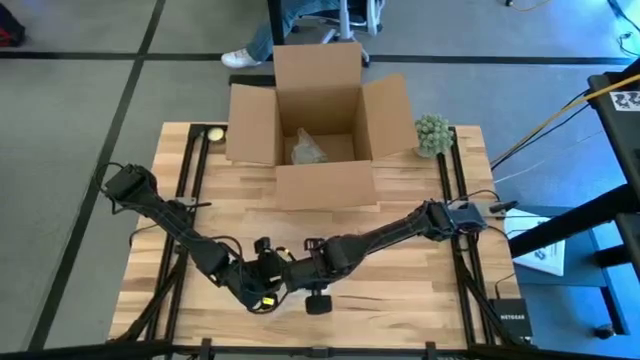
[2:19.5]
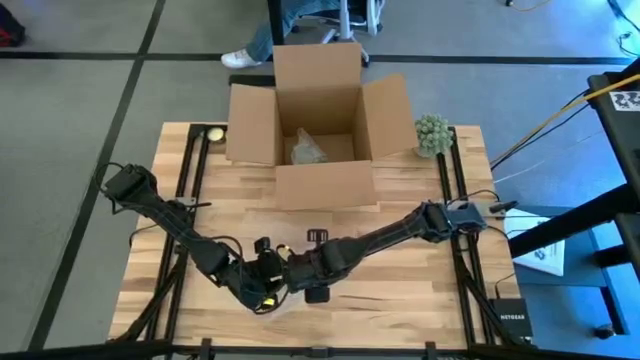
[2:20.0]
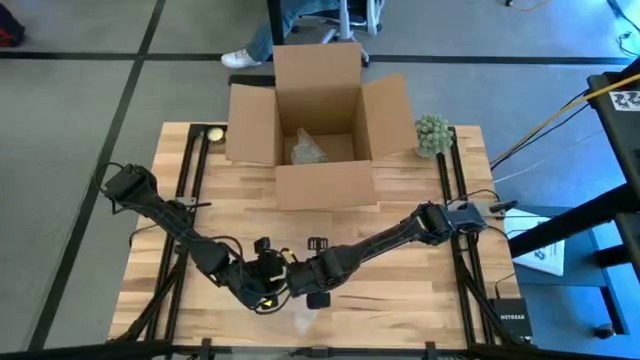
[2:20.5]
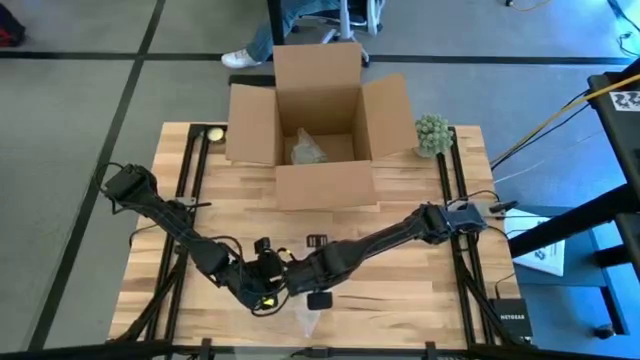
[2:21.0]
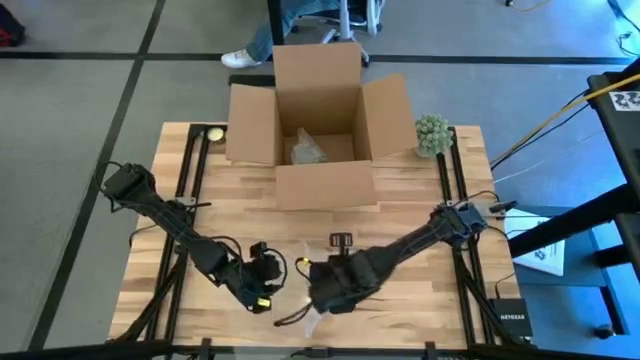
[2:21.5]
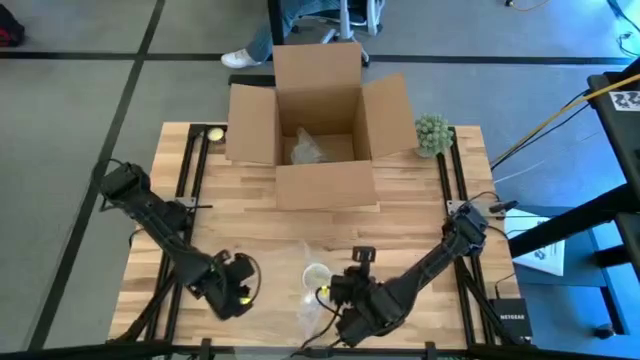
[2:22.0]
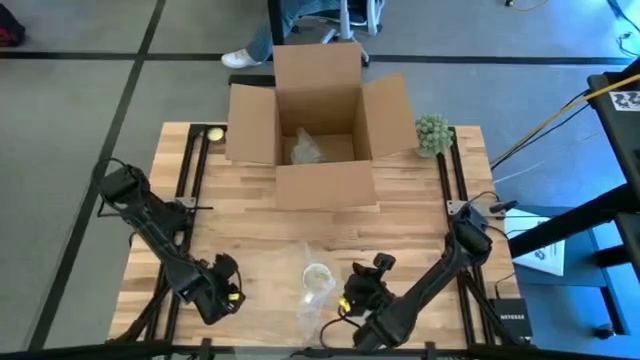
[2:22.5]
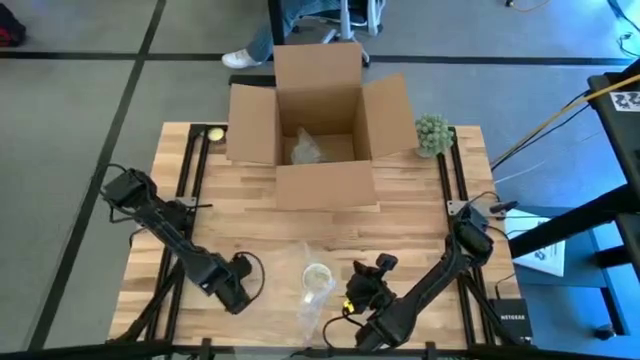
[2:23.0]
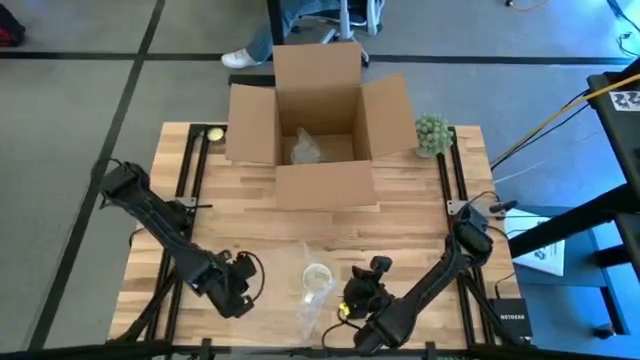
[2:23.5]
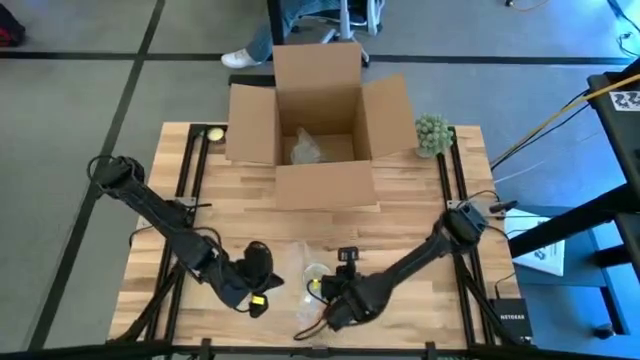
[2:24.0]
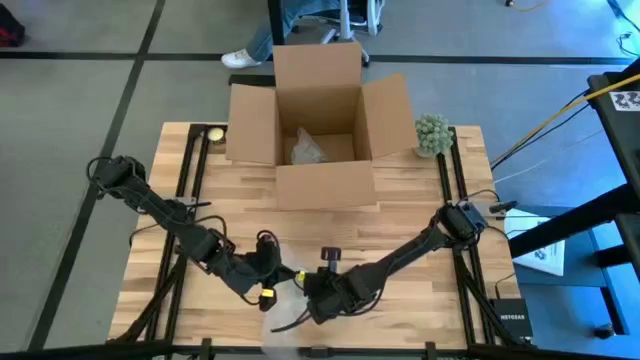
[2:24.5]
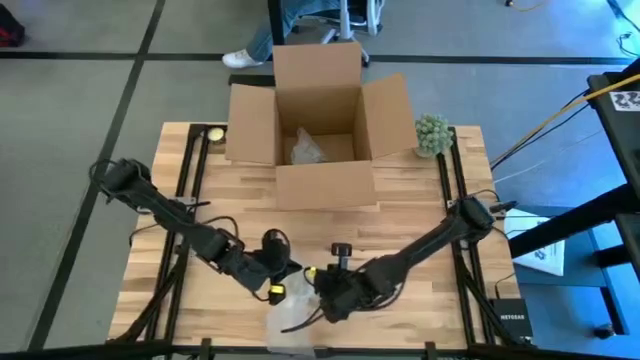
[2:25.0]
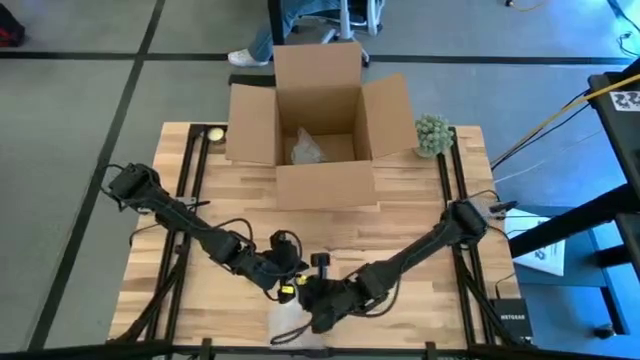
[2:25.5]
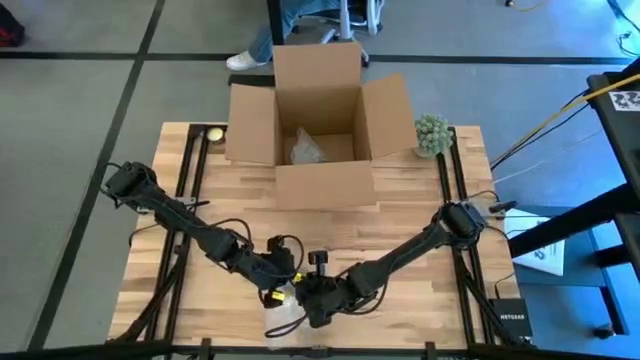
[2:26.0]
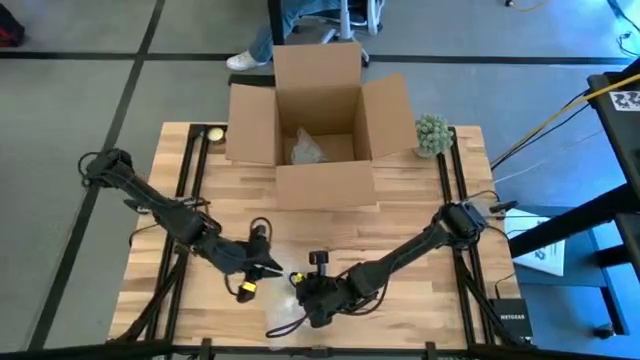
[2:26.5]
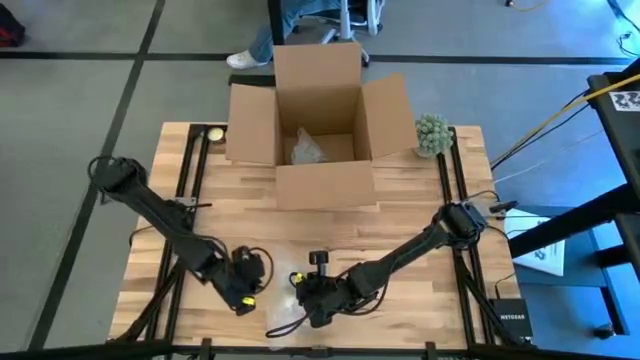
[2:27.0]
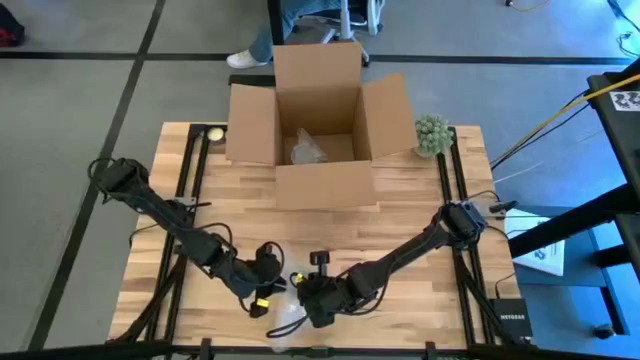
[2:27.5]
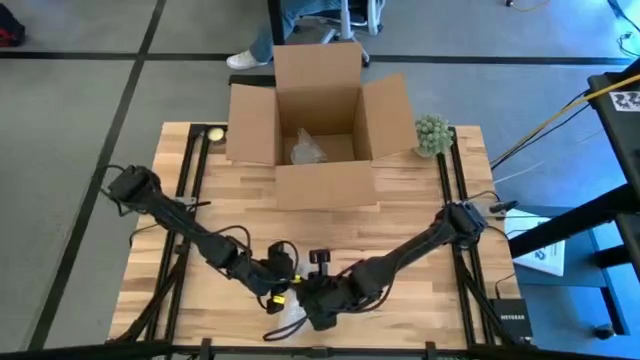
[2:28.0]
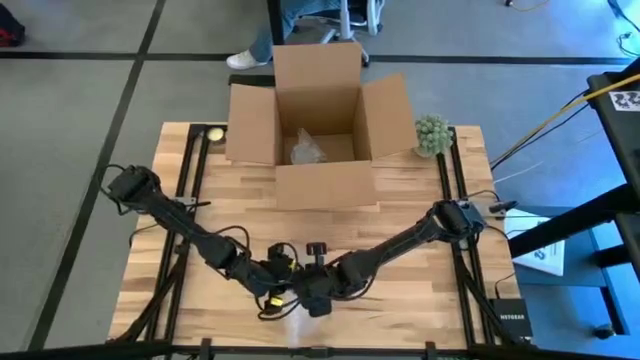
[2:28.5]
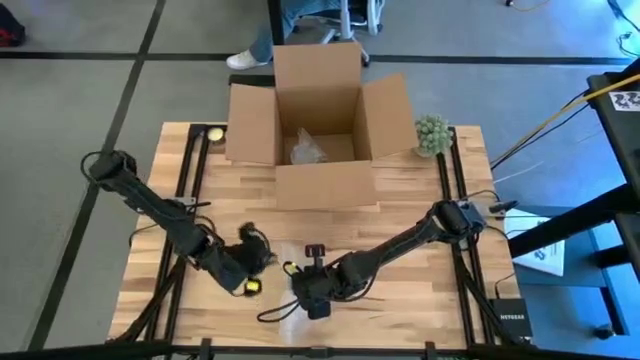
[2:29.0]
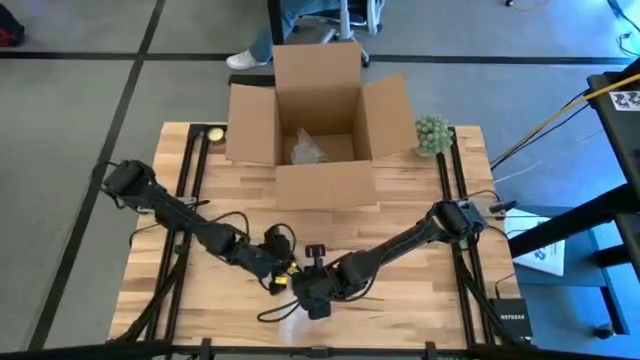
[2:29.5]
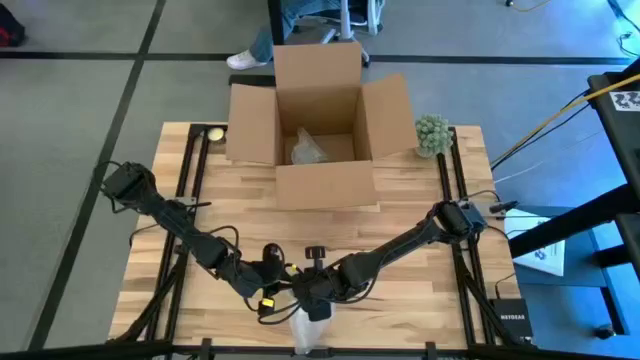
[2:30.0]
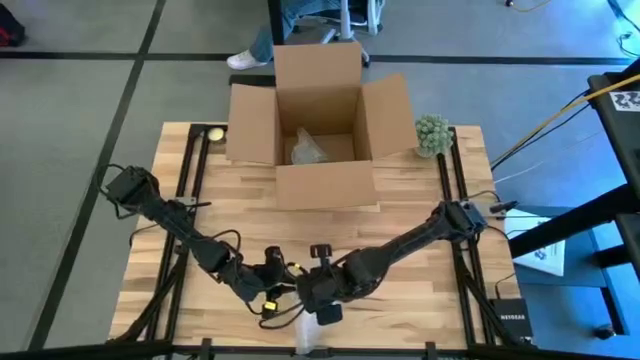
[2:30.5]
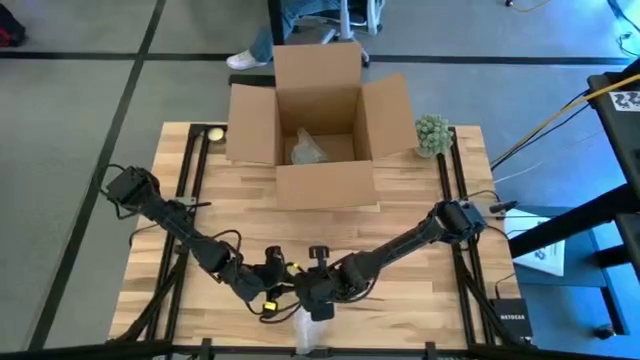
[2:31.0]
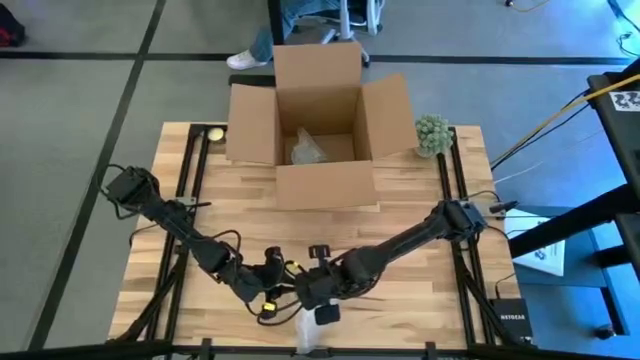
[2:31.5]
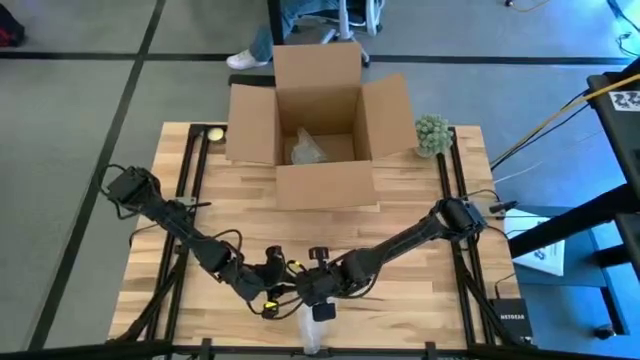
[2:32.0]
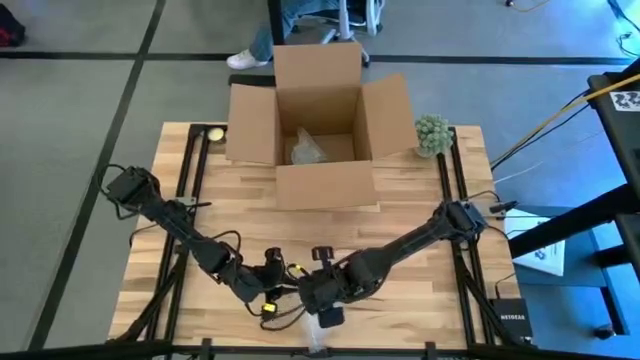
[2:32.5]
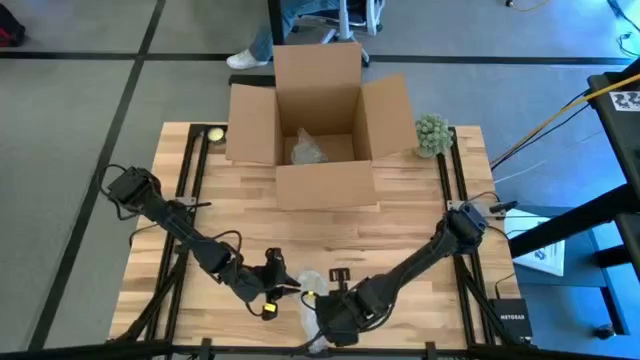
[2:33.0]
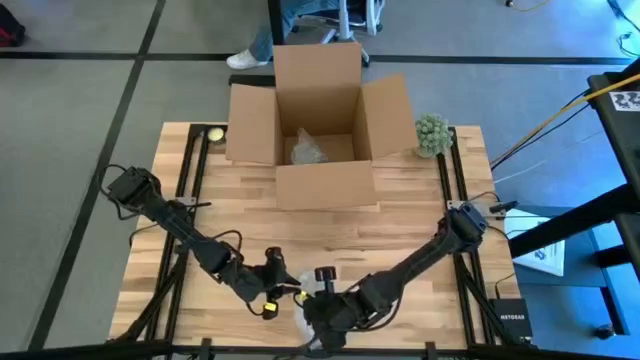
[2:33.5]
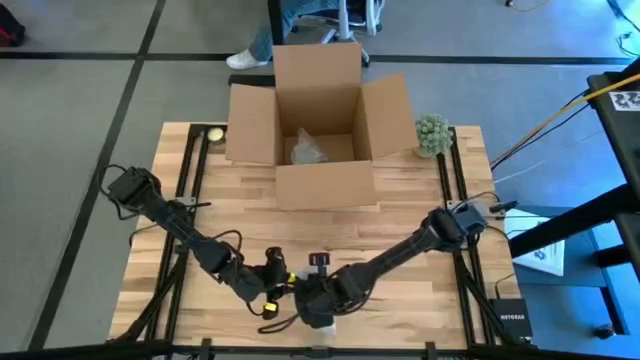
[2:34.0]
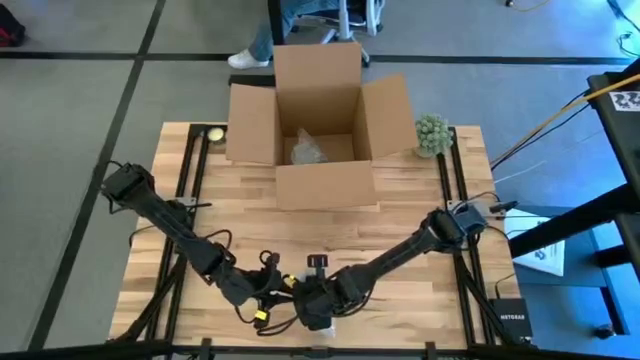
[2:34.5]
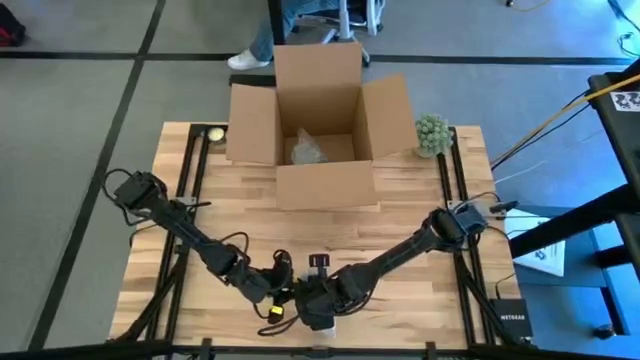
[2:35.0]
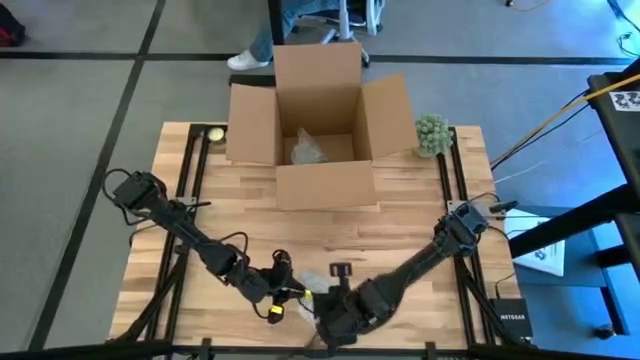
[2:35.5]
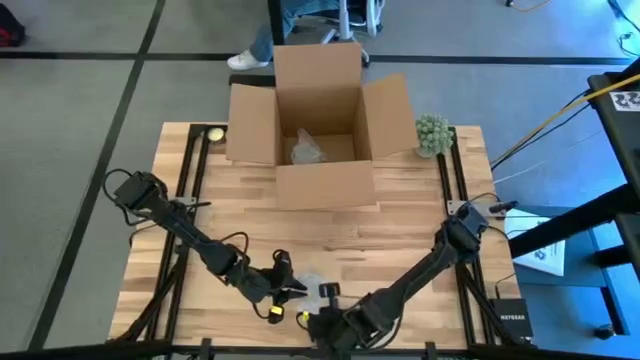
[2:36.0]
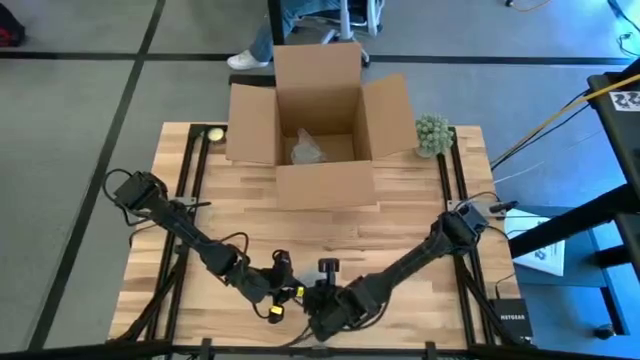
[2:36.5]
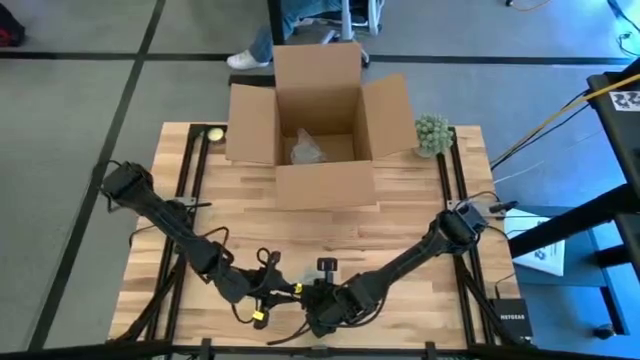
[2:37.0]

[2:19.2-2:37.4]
Task: wrap mug
Wrap the white mug with bubble wrap

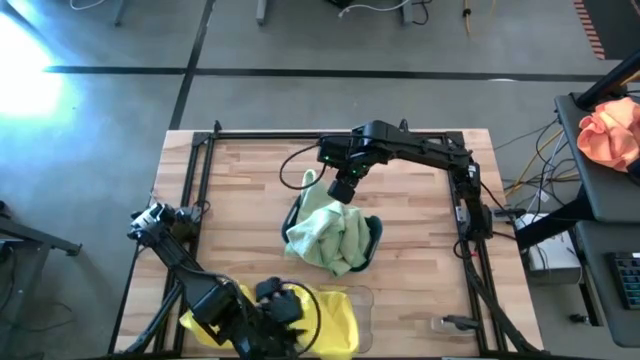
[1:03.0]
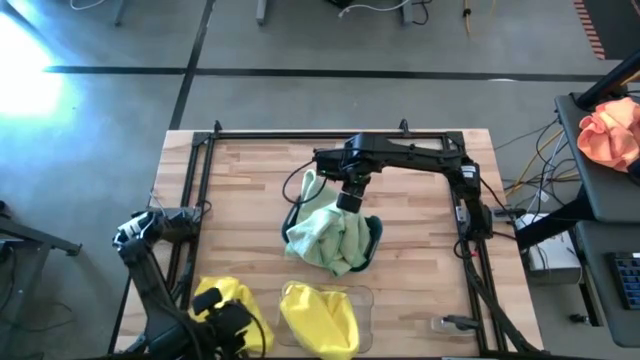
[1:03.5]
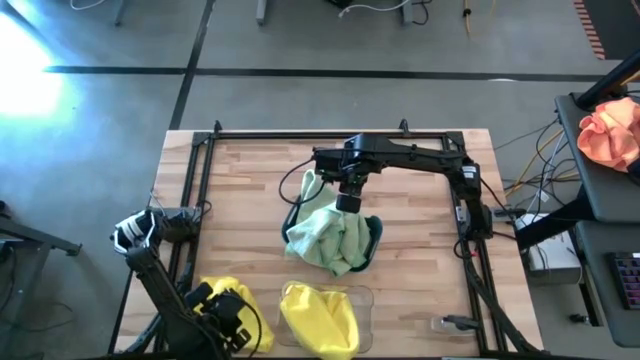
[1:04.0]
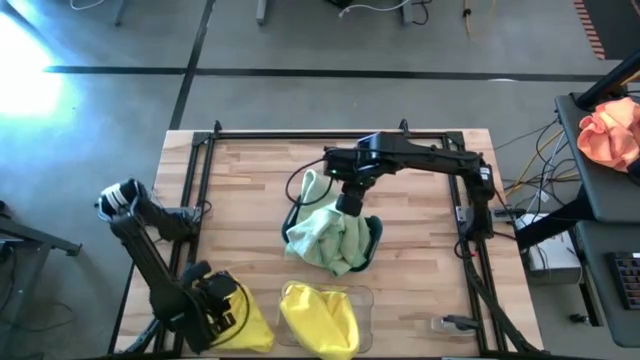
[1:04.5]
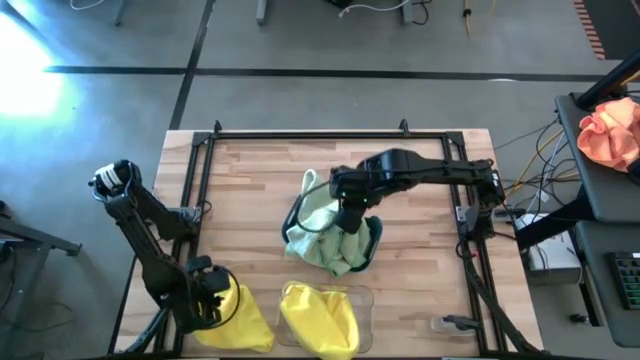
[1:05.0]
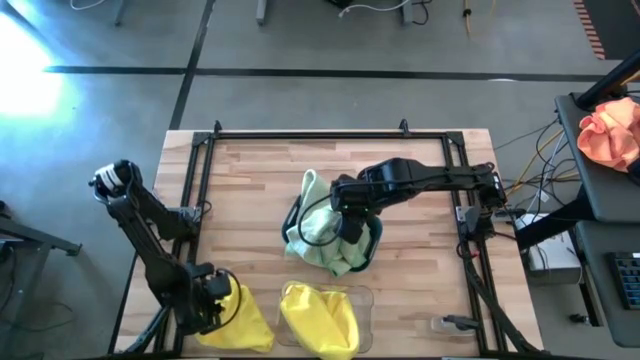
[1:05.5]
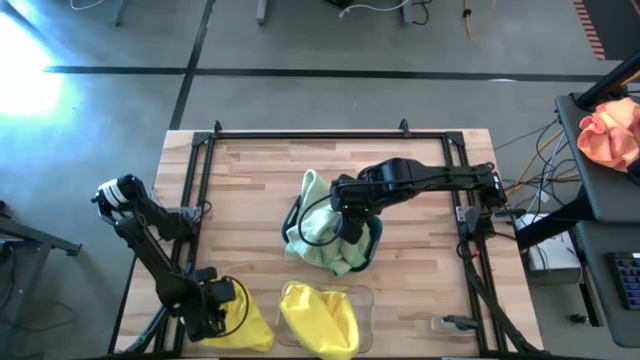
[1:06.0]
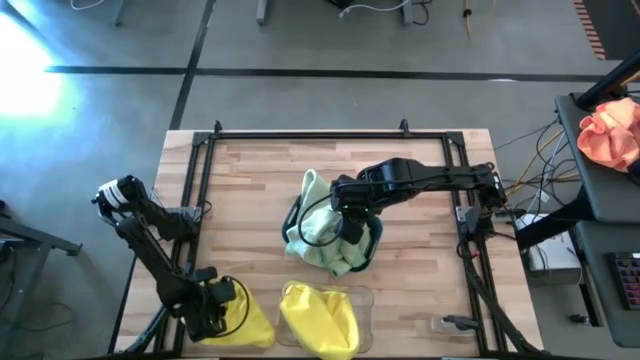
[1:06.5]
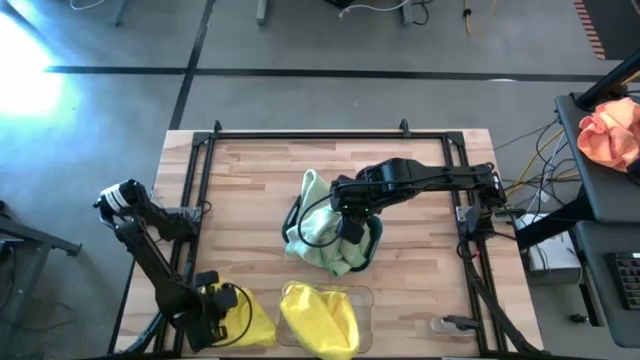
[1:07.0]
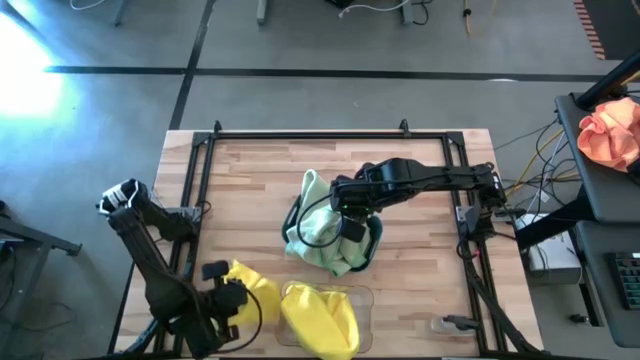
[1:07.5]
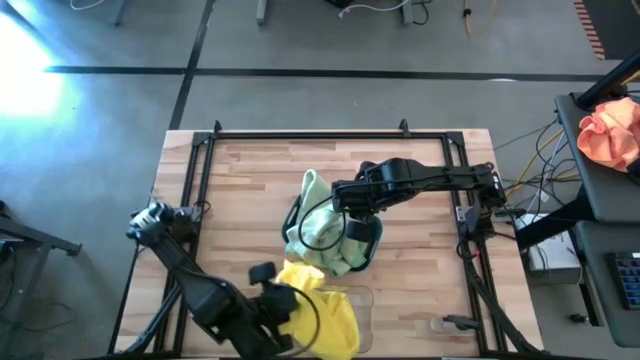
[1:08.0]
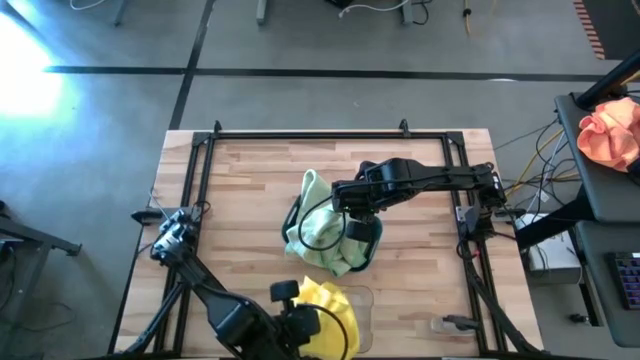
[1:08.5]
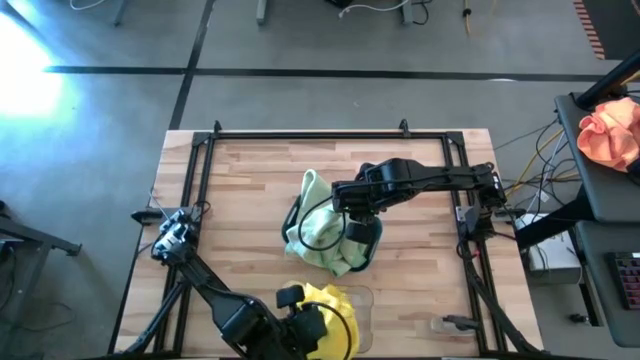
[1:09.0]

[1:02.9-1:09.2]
Task: Sort microfiber towel by color & place in baskets
Put the yellow microfiber cloth into the transparent bin
